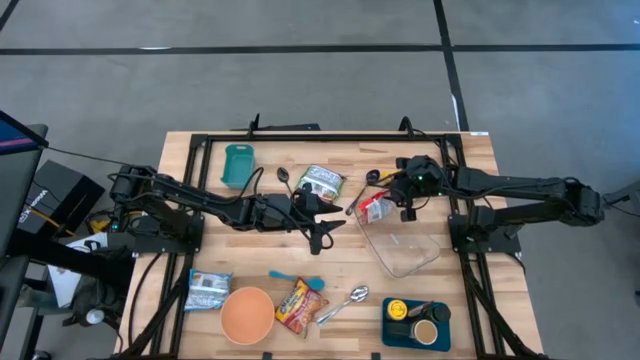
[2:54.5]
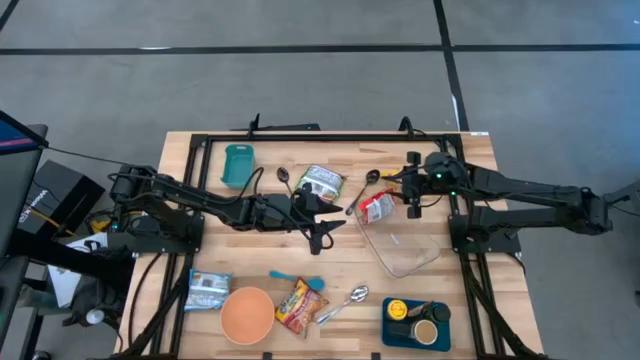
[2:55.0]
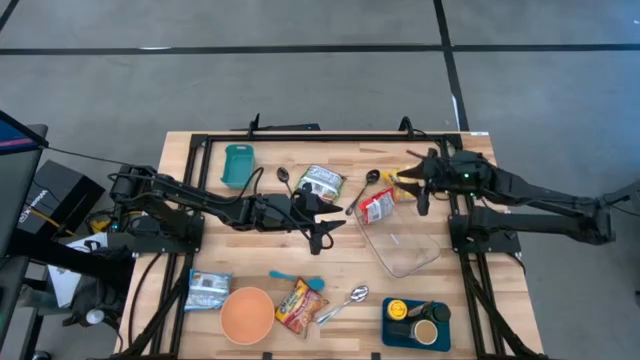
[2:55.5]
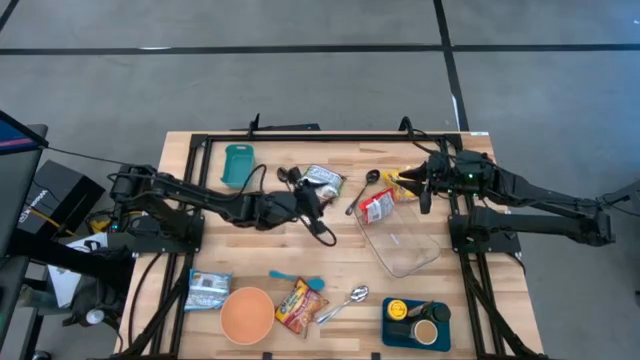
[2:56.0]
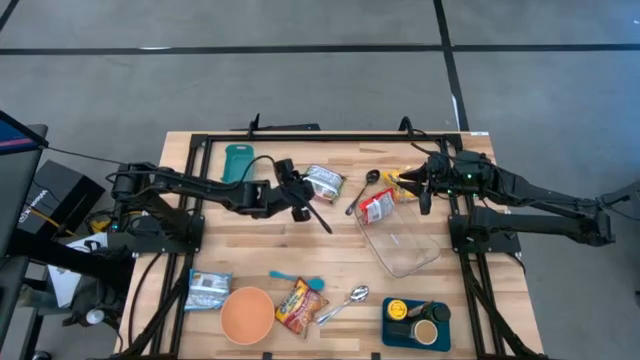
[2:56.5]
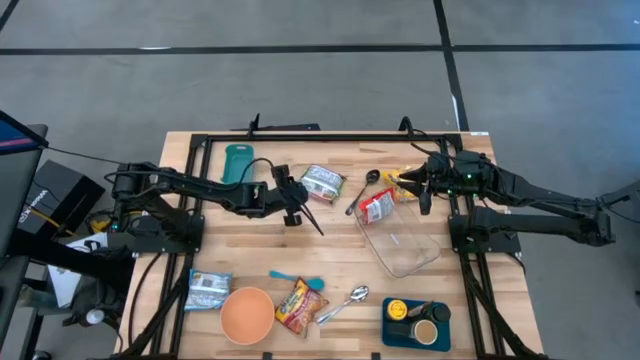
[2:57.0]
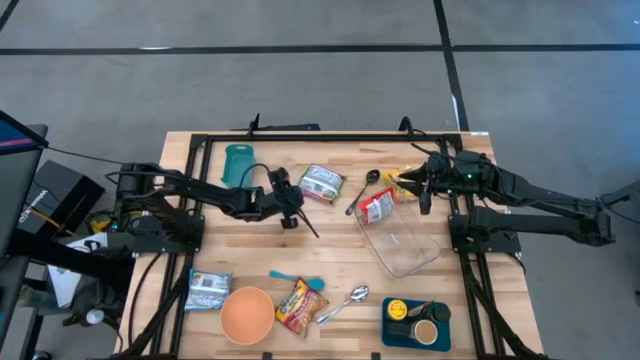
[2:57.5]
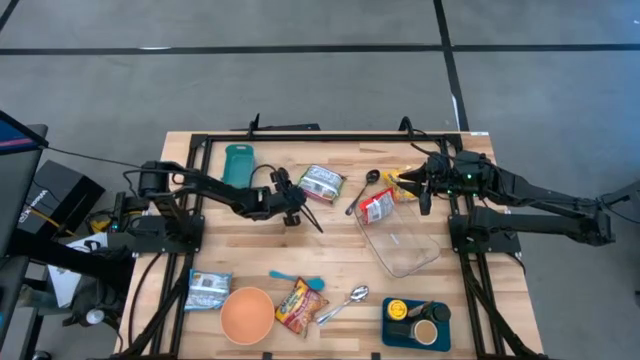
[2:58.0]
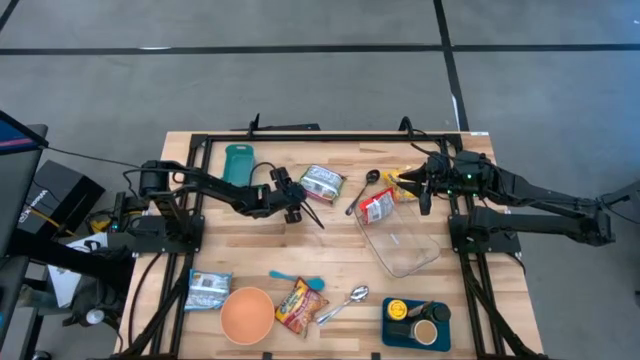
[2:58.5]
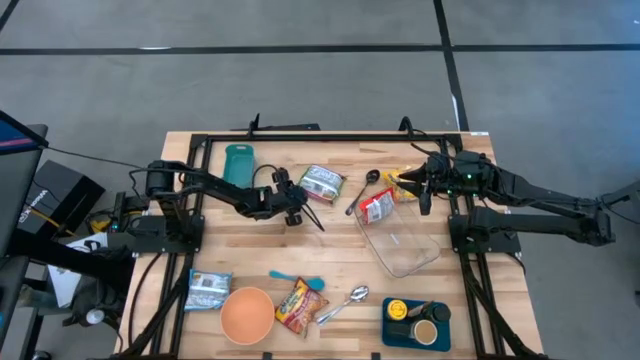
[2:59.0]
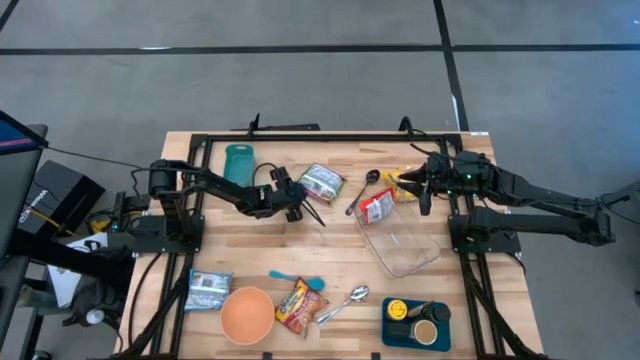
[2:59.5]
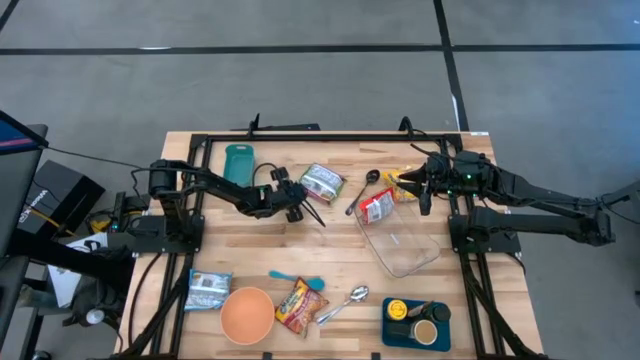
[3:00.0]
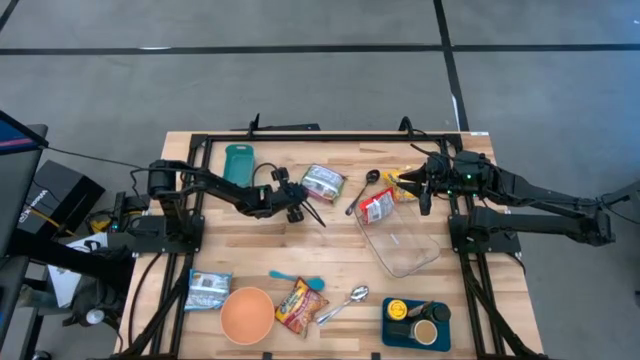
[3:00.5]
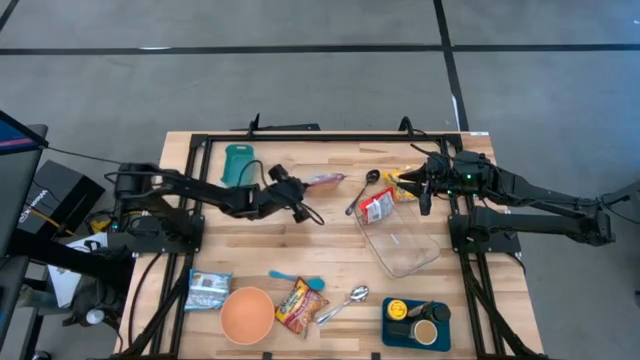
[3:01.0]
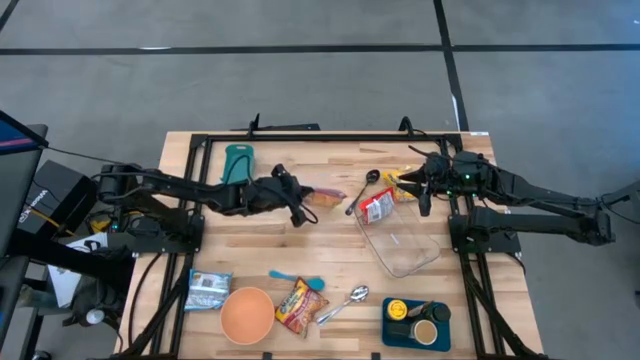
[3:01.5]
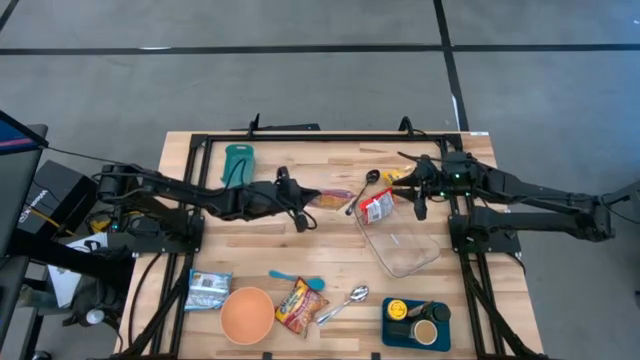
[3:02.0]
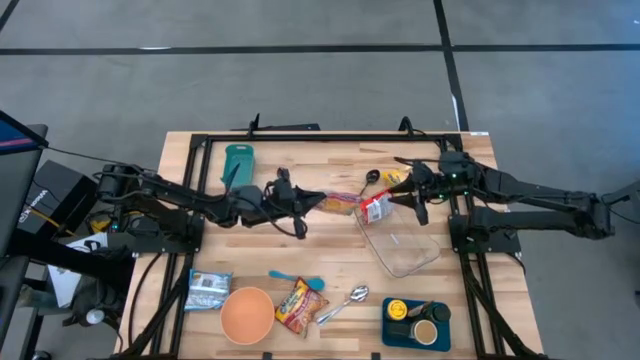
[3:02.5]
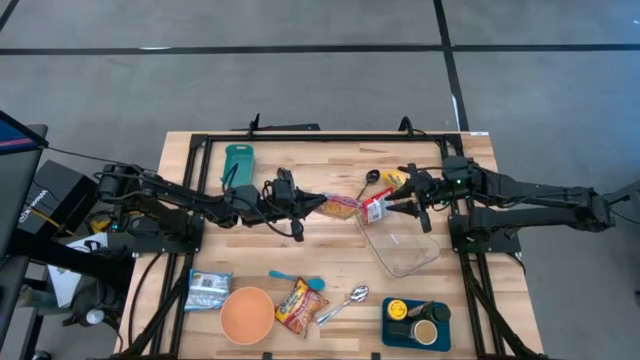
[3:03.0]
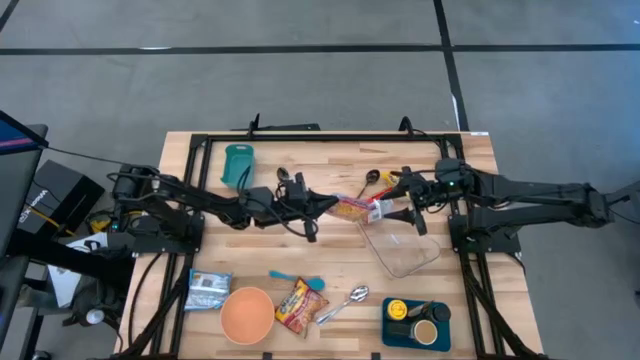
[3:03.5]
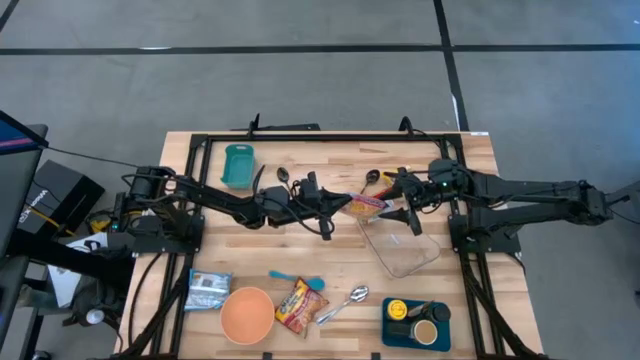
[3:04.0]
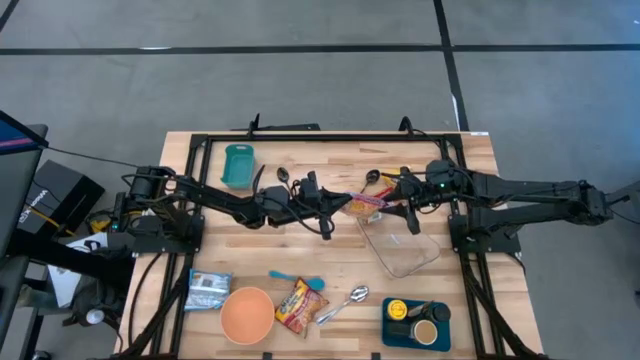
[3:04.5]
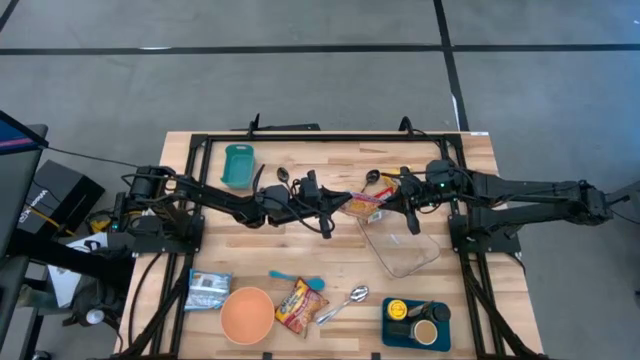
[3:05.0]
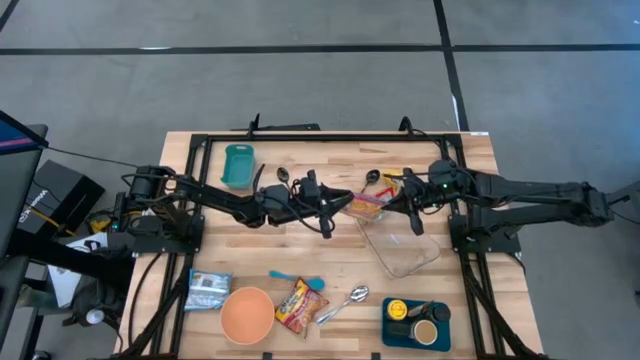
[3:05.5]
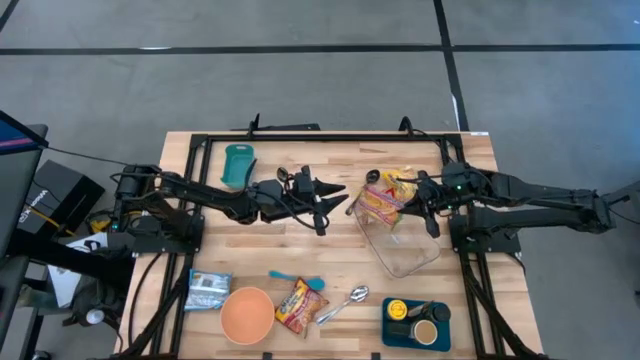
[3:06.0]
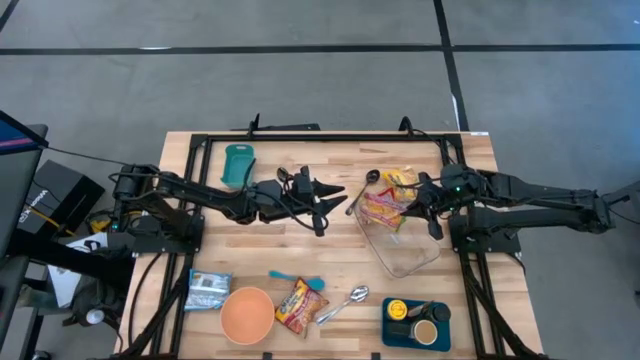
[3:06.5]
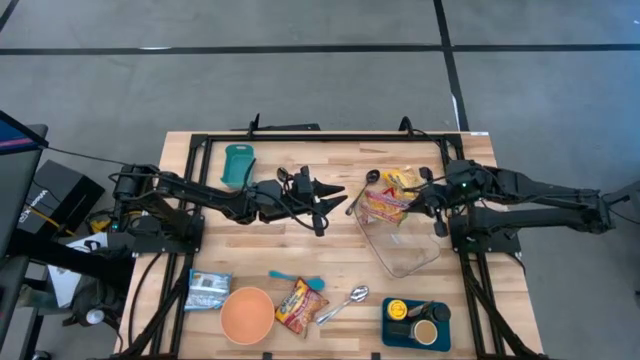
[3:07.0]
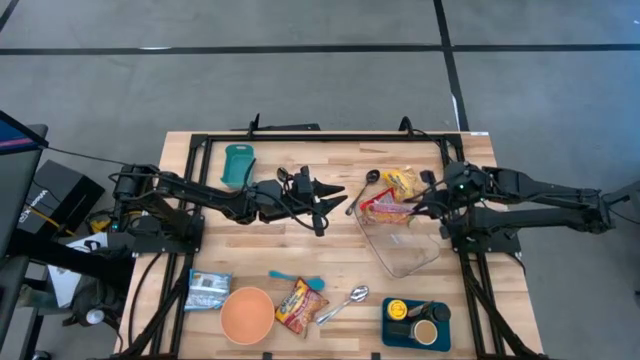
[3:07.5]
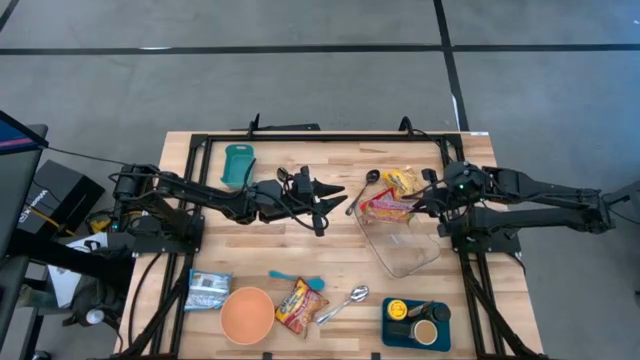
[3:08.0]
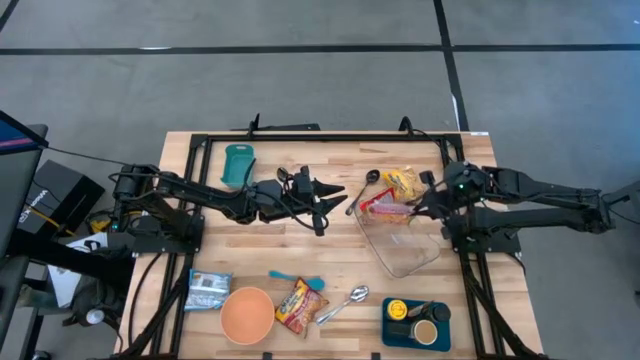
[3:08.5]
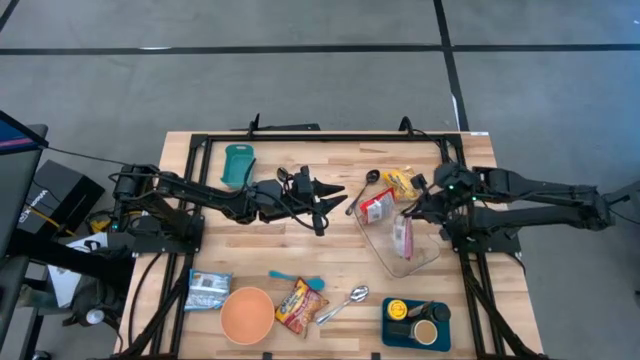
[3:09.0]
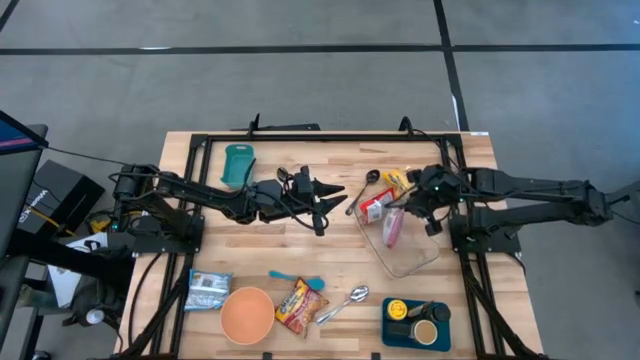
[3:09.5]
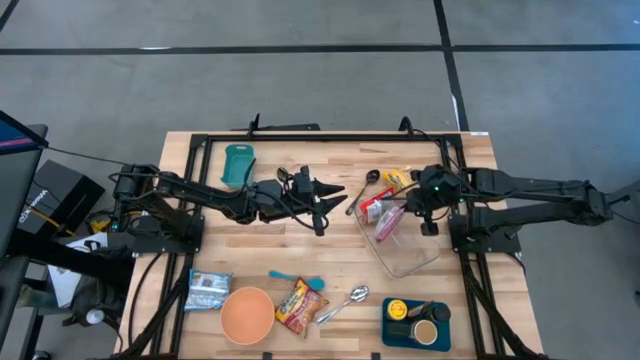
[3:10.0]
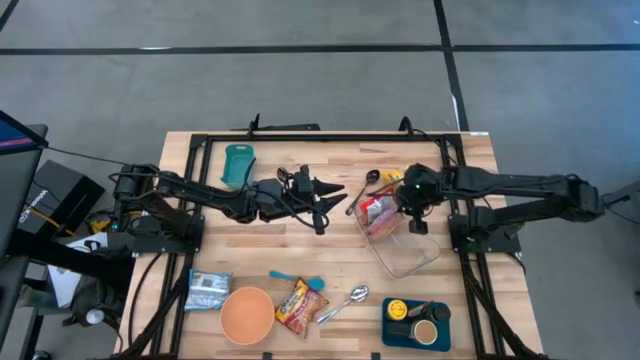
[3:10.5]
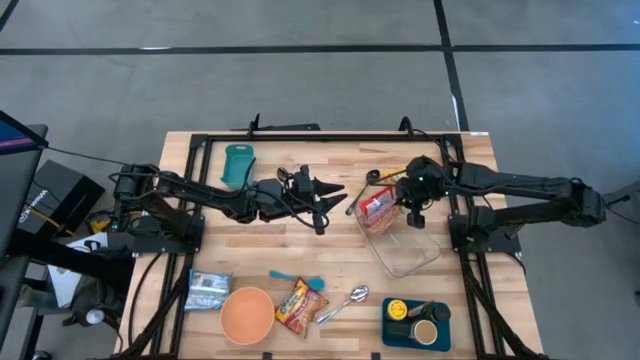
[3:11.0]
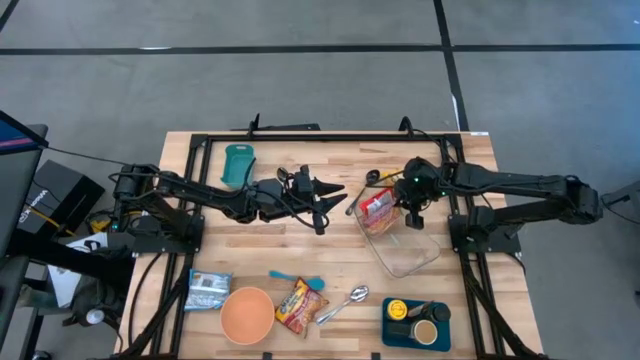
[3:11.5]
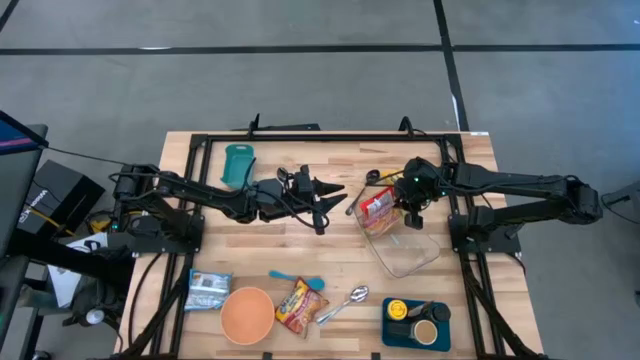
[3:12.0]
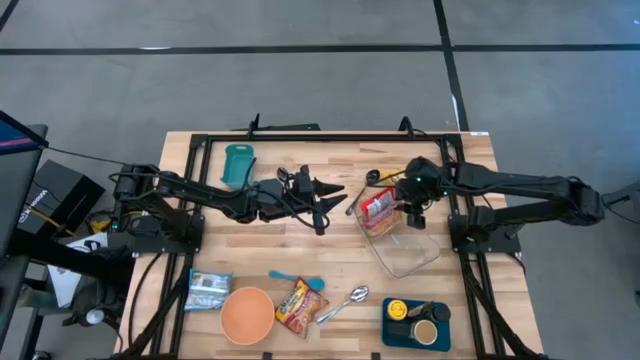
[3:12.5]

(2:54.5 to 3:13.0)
Task: Pick & Place Food Item
Put the green noodle pack into the transparent bin

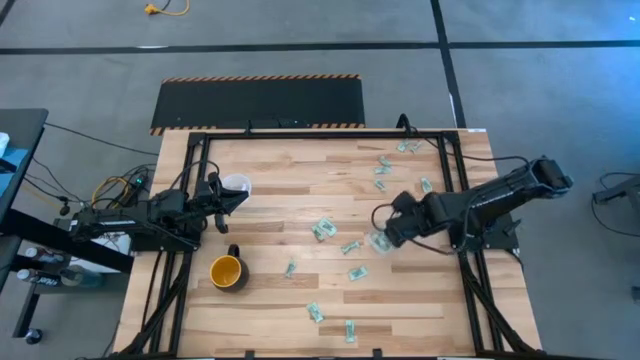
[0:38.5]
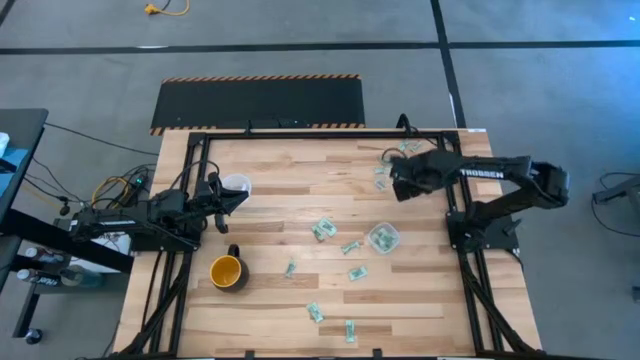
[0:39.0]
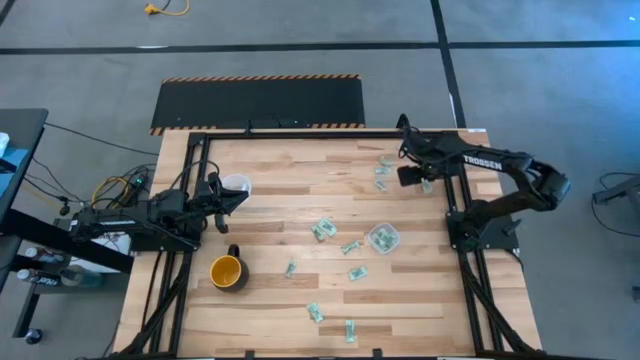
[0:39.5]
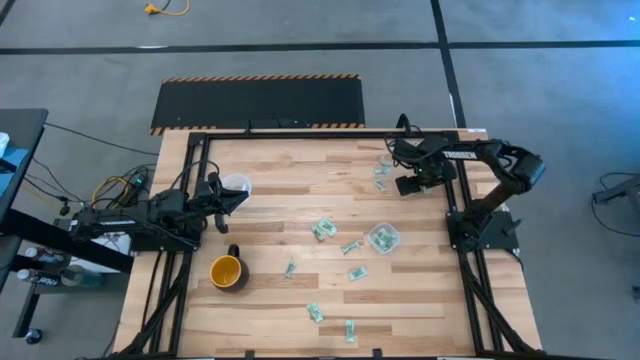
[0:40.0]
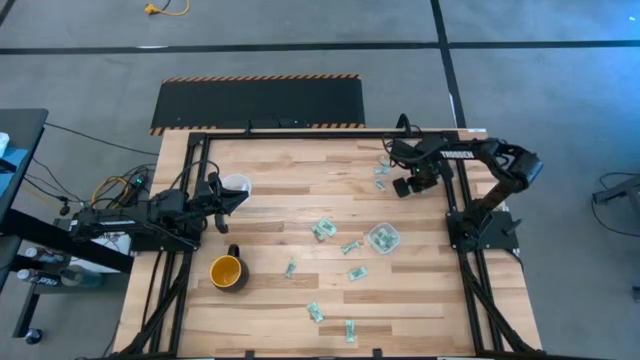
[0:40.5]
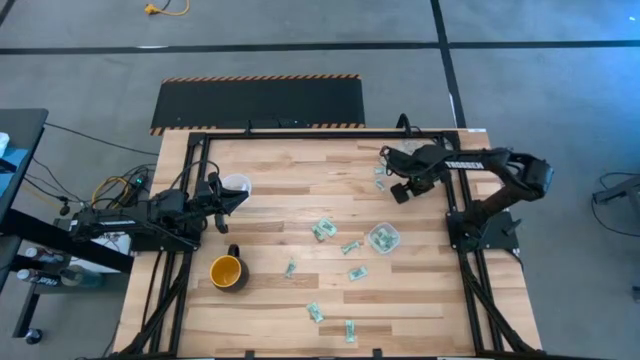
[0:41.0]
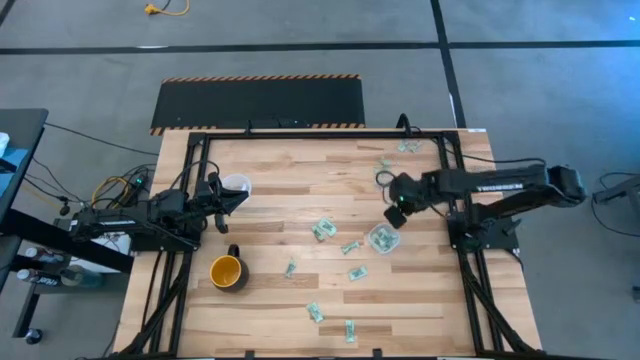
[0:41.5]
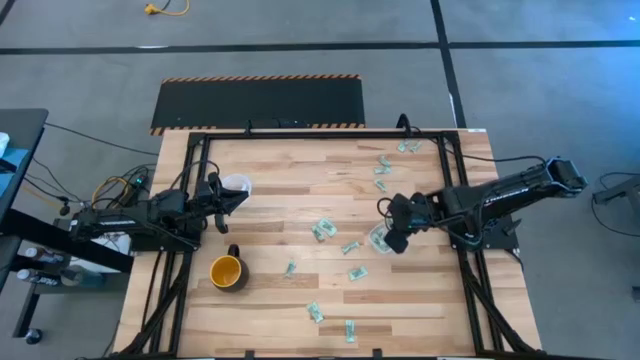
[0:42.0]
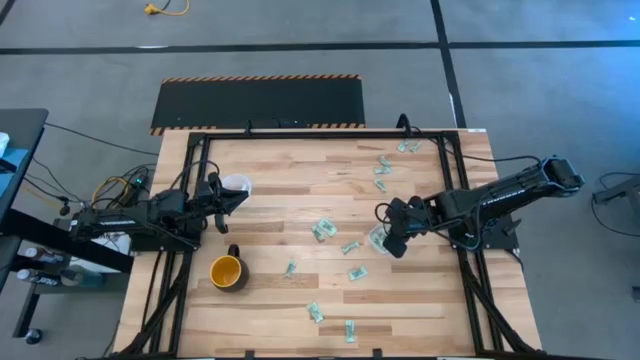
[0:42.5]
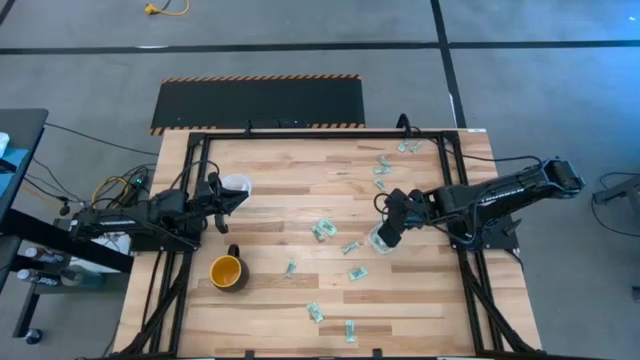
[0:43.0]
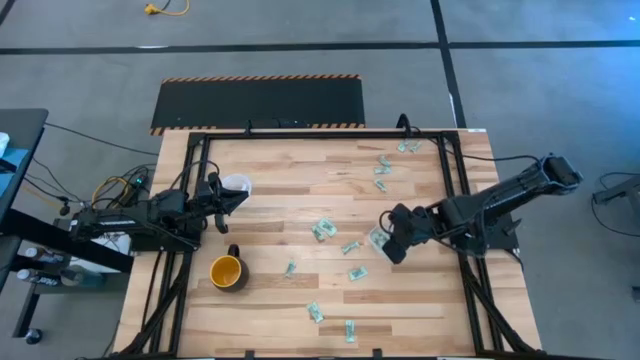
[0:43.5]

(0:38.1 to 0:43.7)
Task: Pick and place Stevia / Truvia into bins
Put the white stevia packet into the square transparent container
